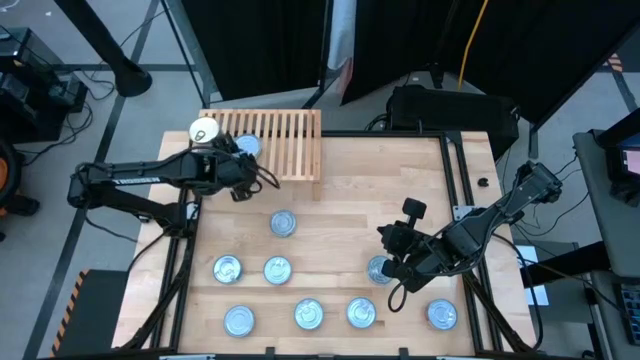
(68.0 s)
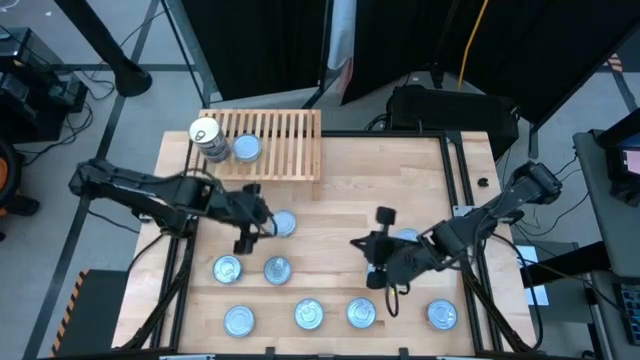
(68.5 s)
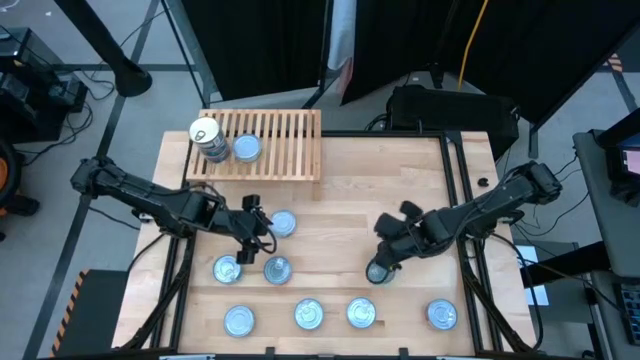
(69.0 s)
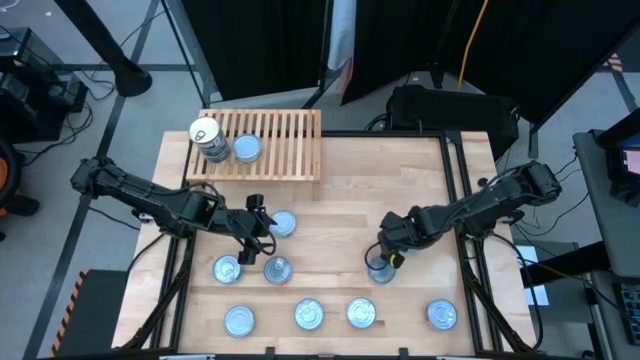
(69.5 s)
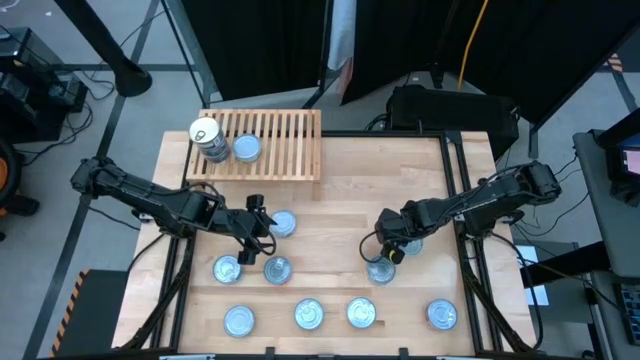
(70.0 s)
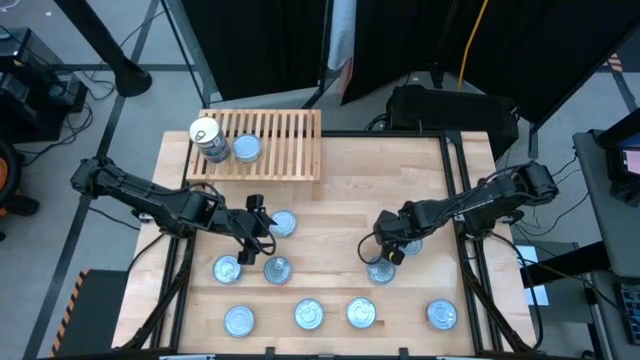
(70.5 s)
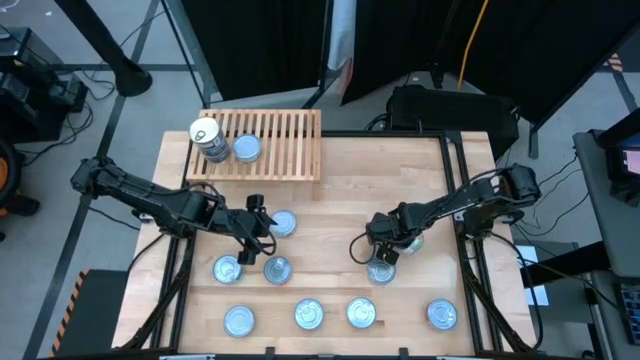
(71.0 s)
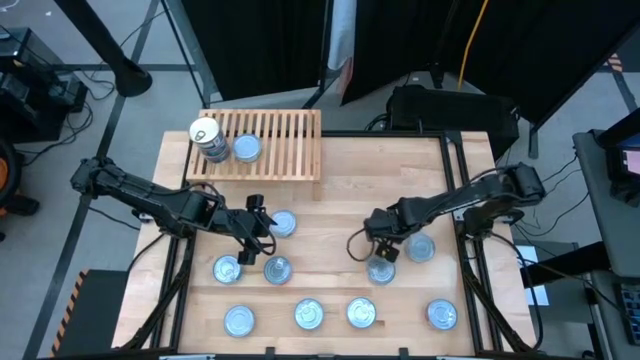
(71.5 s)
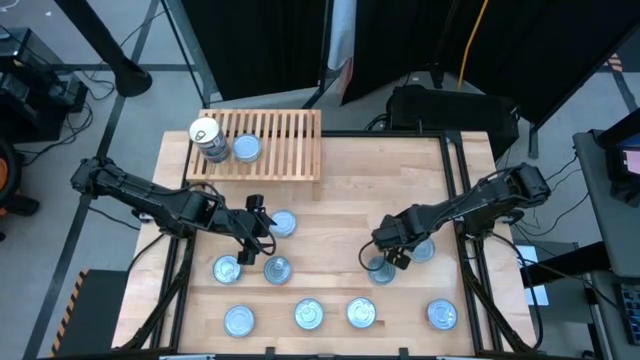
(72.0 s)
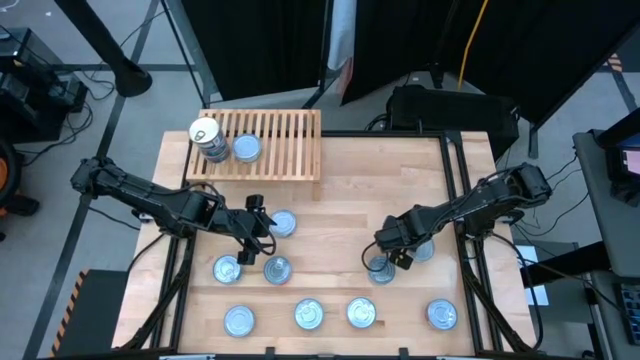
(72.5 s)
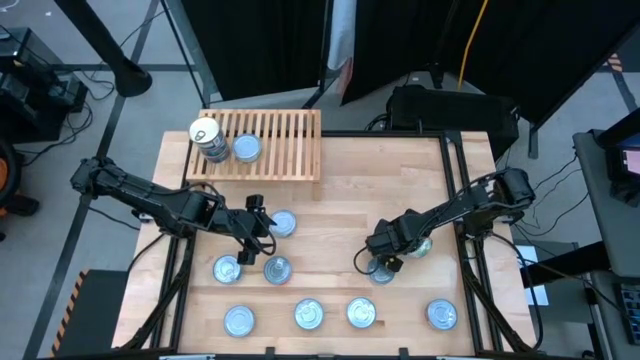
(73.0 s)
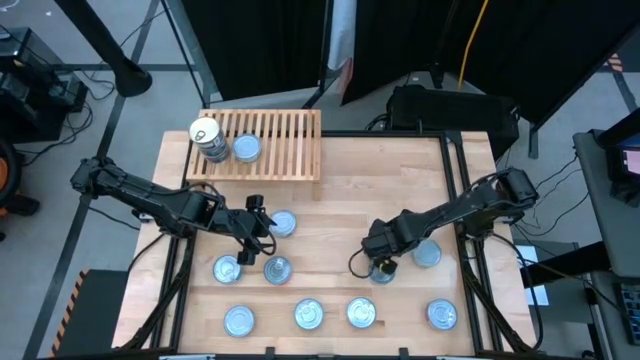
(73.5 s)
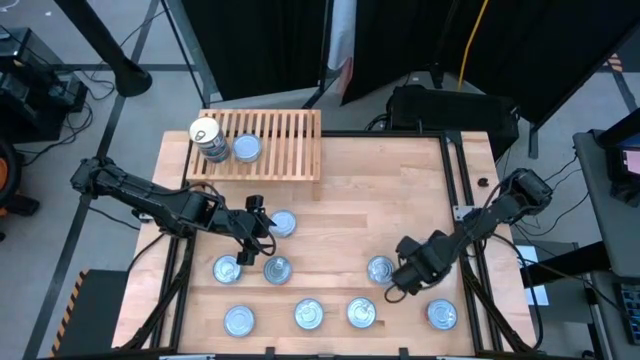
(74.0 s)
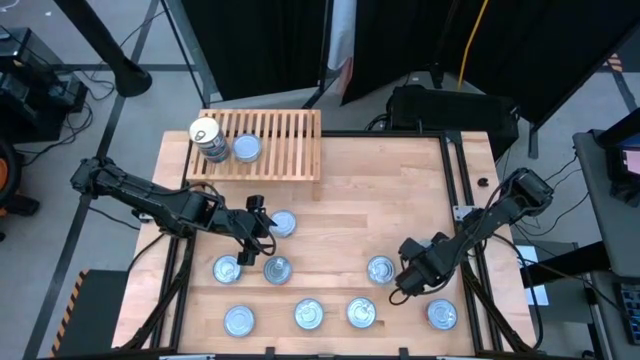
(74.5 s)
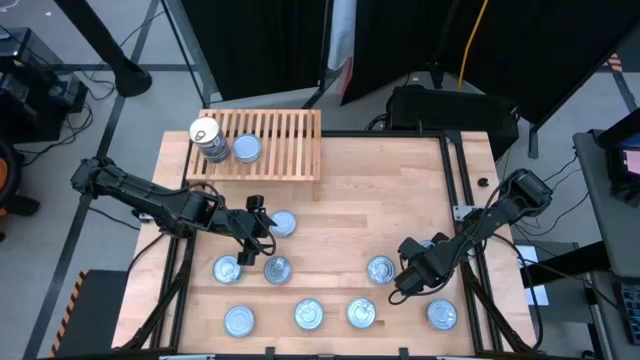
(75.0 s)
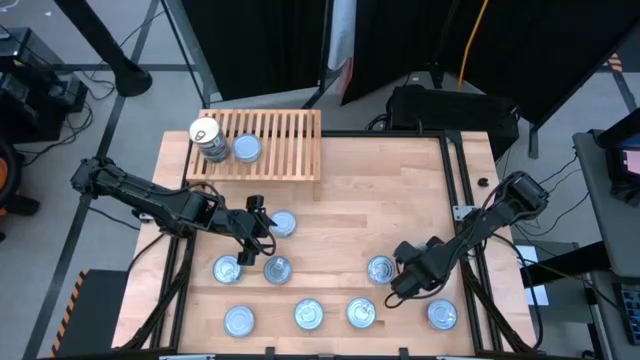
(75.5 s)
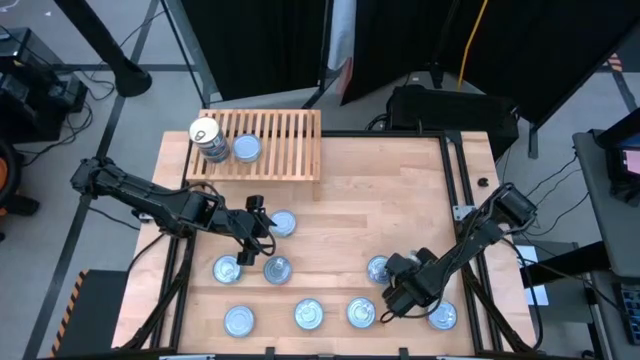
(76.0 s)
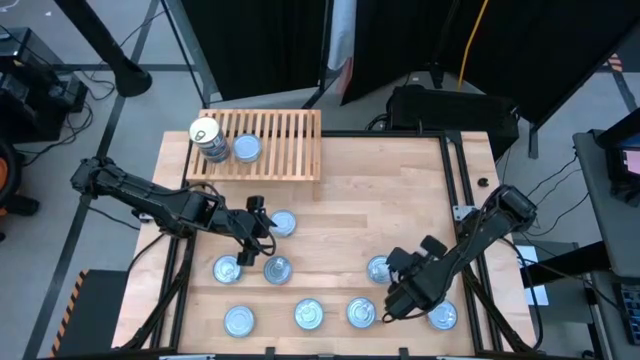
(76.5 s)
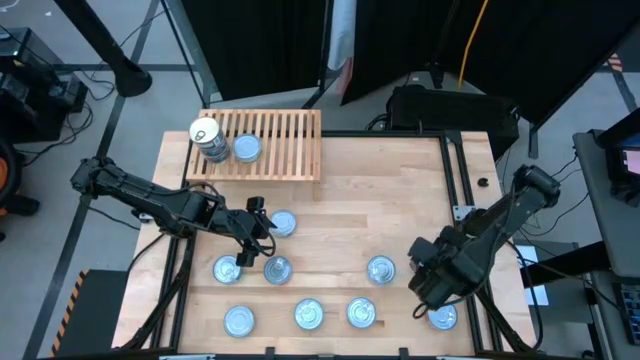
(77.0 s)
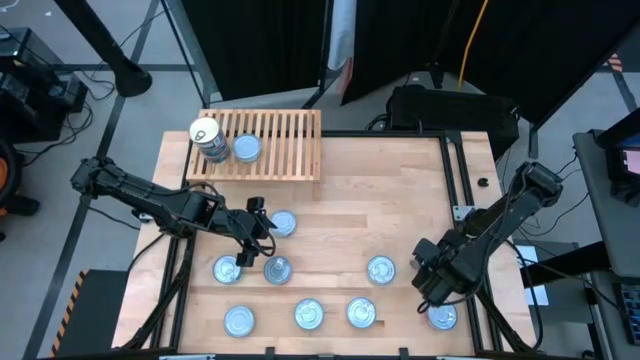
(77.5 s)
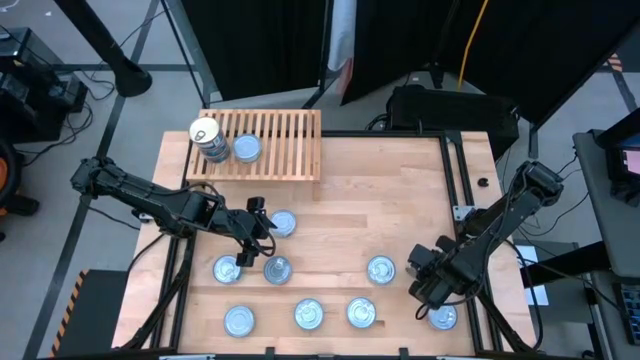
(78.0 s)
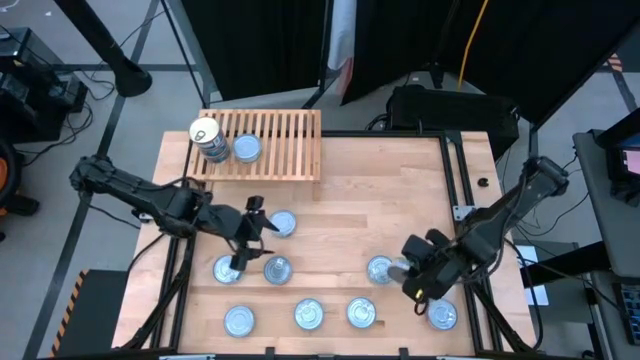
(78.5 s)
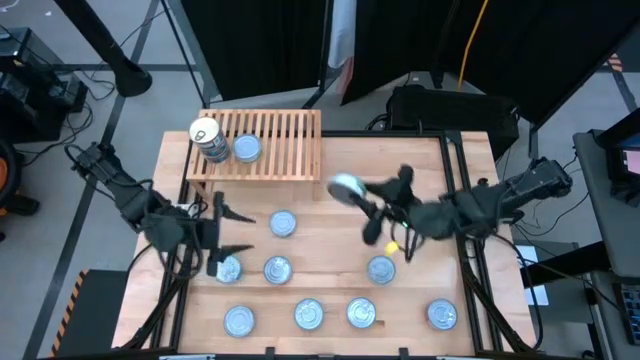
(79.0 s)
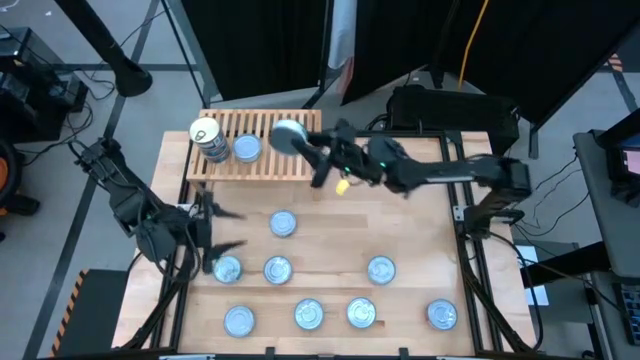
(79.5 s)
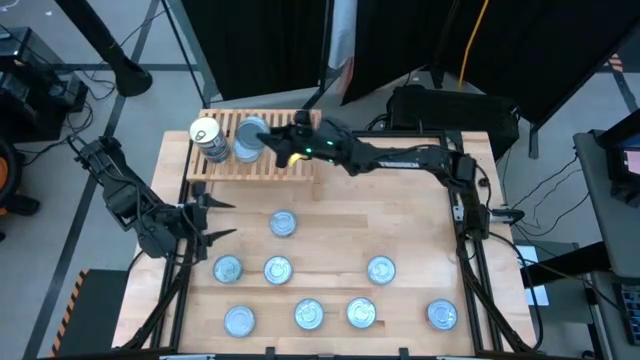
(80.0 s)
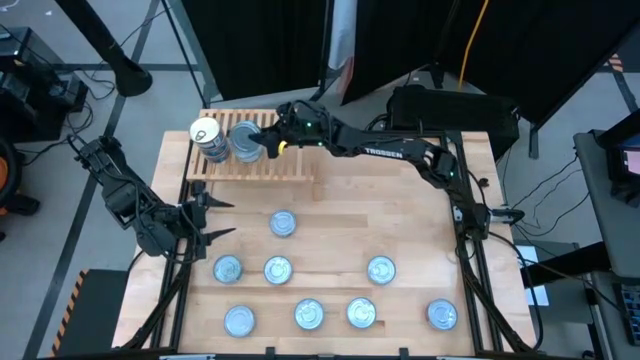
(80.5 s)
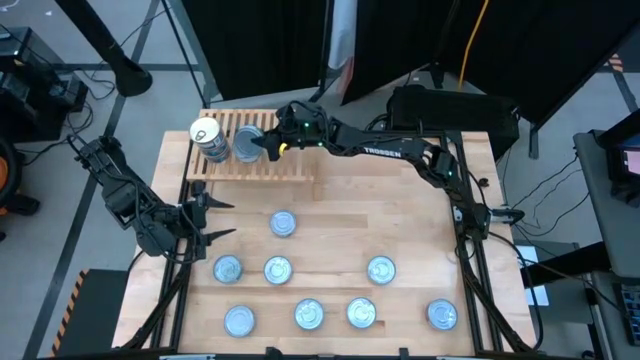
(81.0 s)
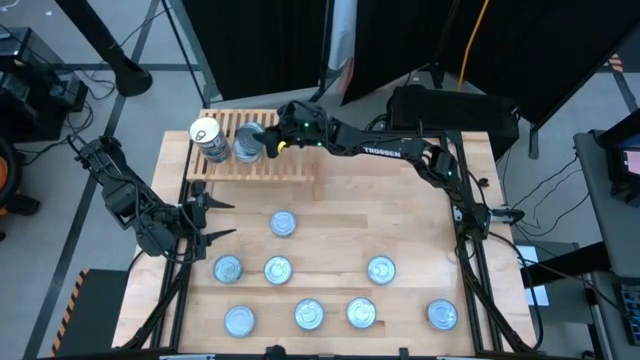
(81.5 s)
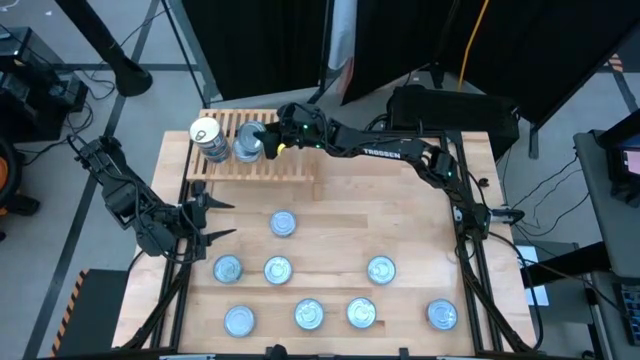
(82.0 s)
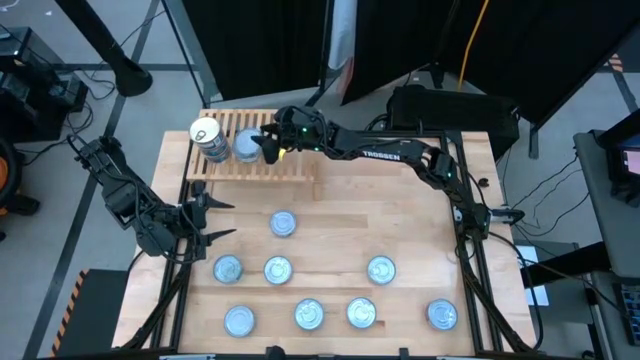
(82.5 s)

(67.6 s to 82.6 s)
Task: Stack canned seafood by type on shelf
Stack the right green can on top of the other green can

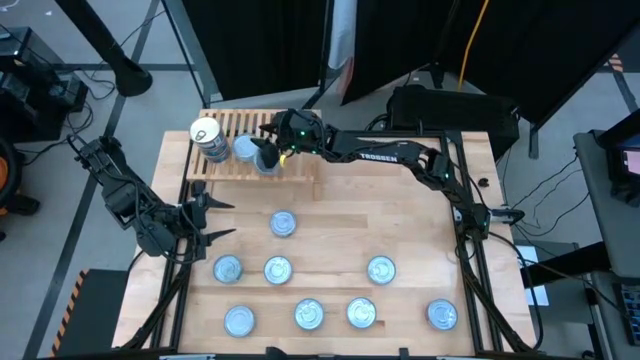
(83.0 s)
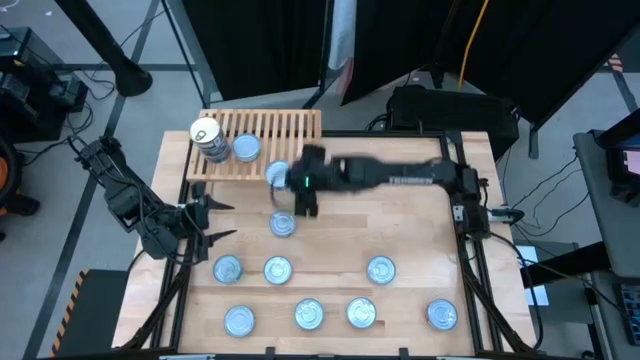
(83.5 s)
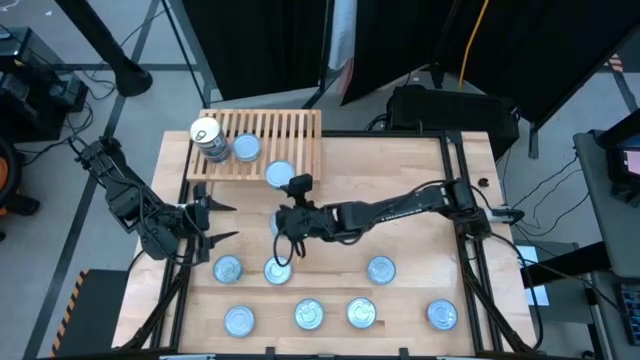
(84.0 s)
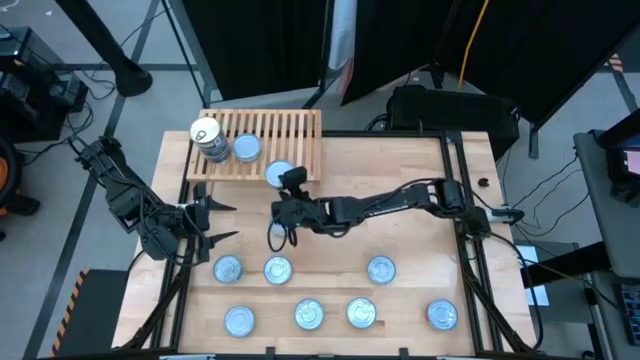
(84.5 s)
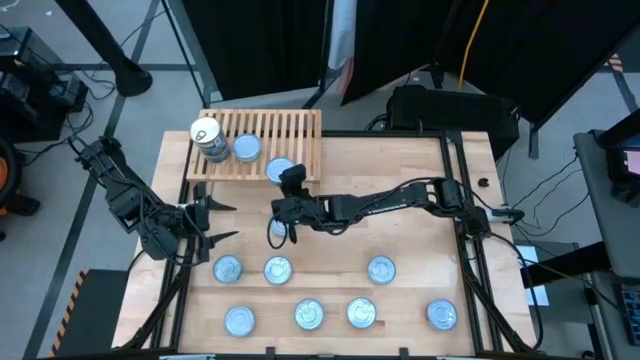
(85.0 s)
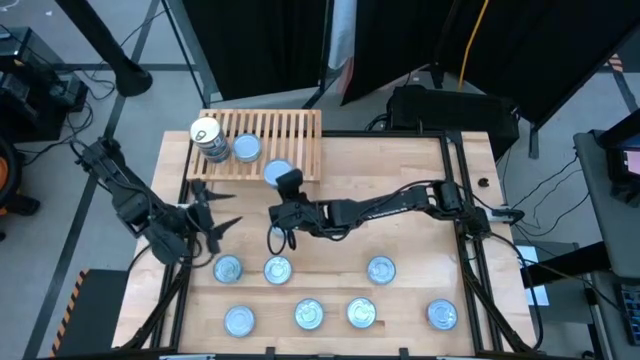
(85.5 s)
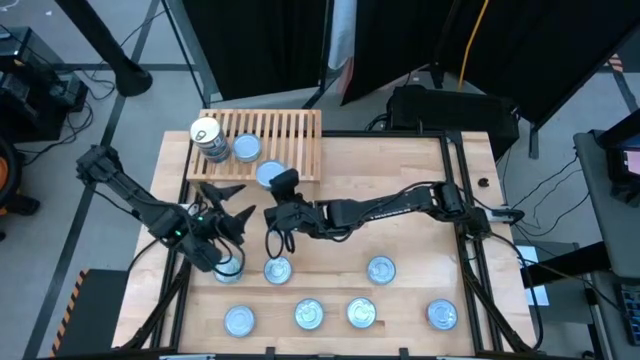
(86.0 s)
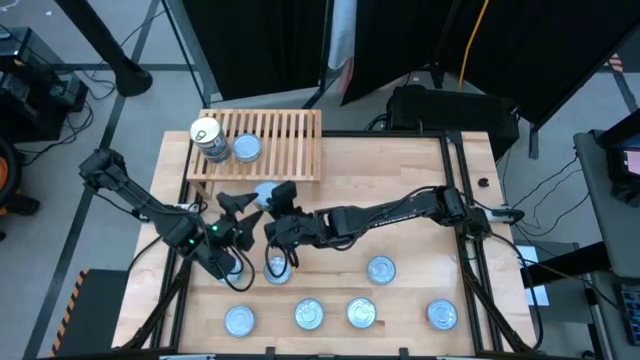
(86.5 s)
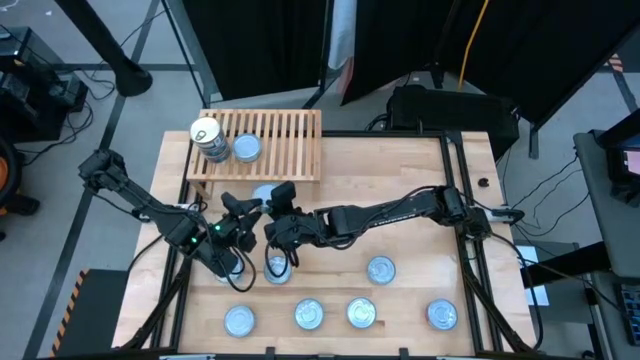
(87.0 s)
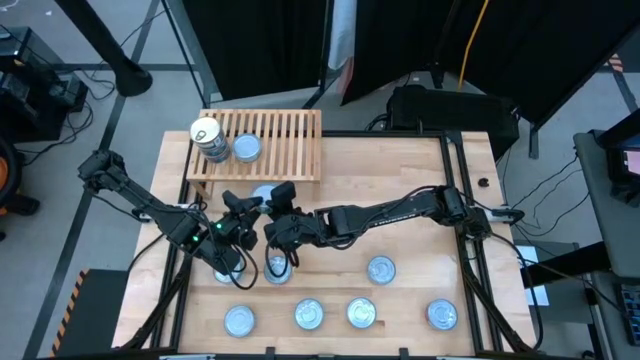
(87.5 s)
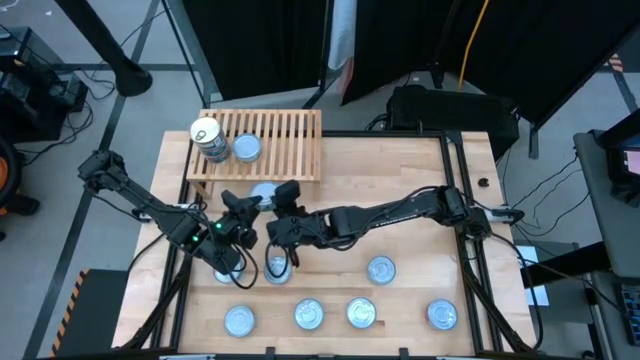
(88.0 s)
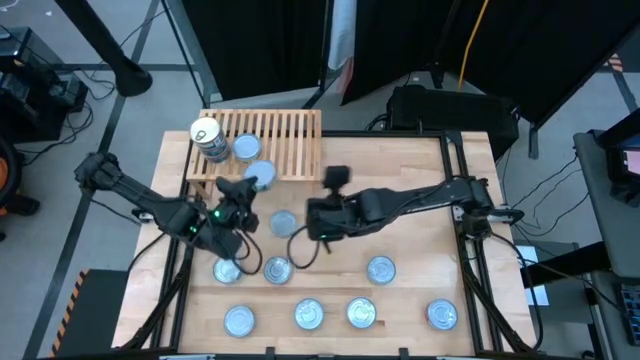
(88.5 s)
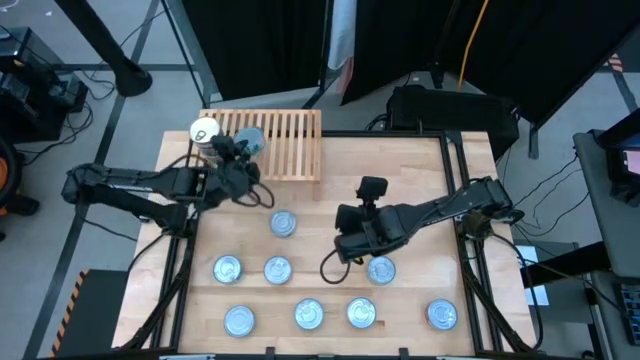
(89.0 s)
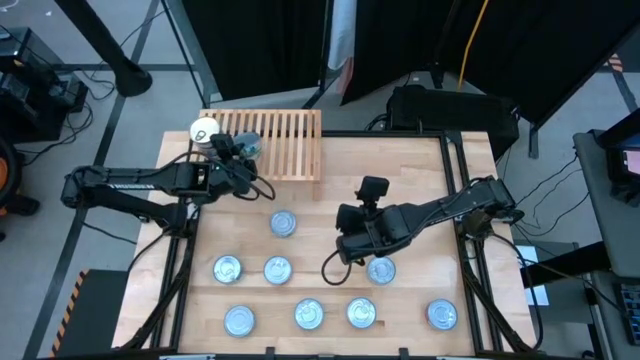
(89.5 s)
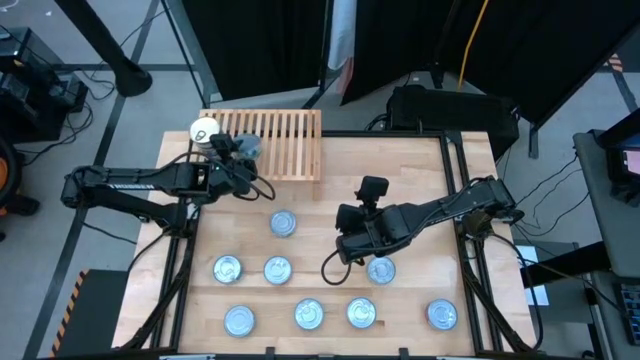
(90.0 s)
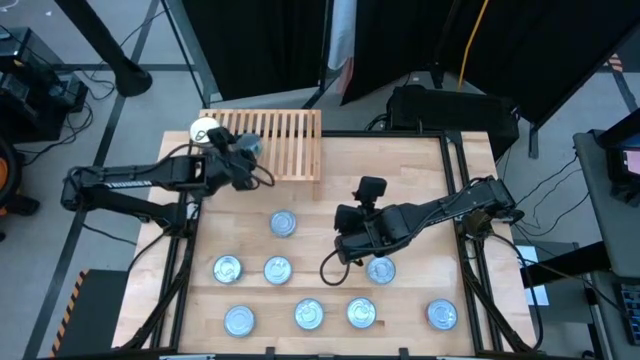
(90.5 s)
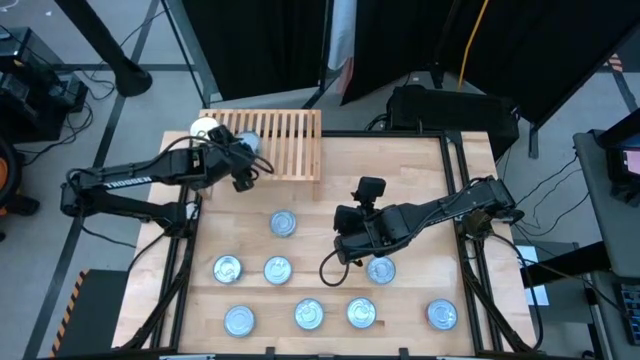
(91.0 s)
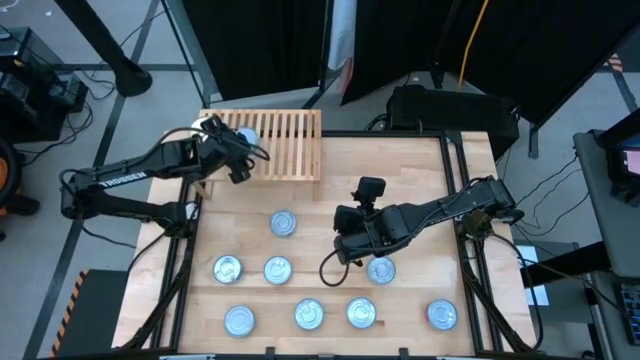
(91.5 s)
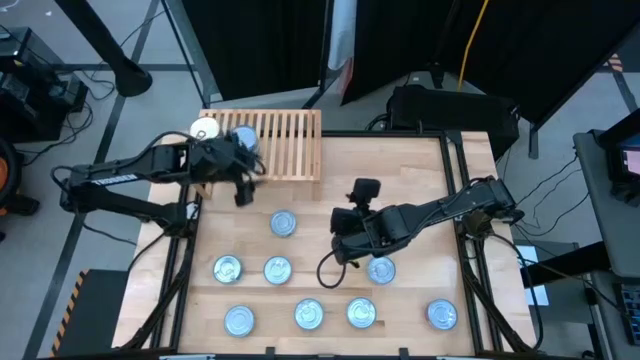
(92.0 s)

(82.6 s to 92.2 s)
Stack the green can on top of the other green can
